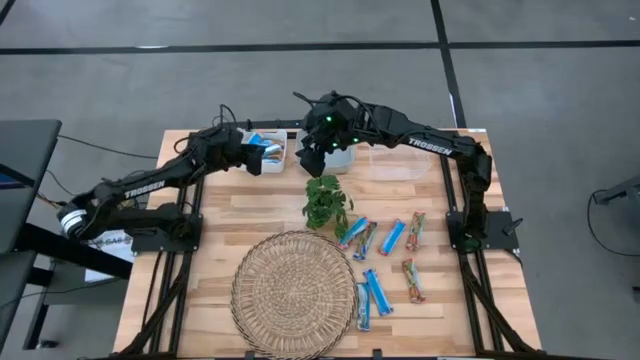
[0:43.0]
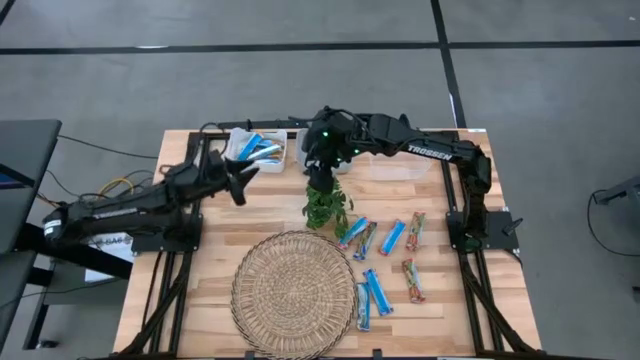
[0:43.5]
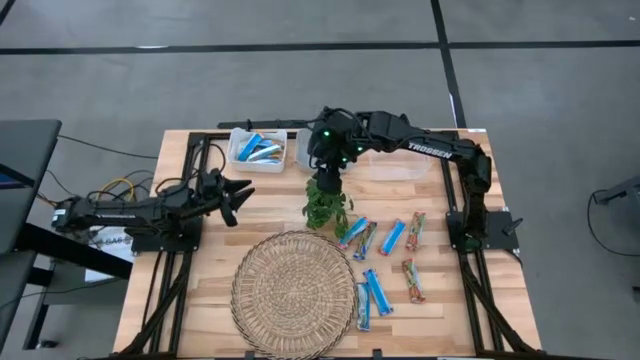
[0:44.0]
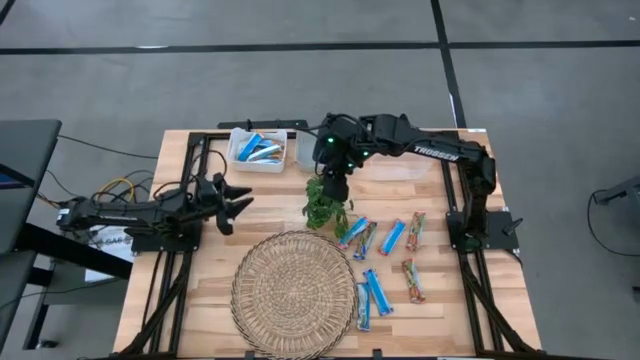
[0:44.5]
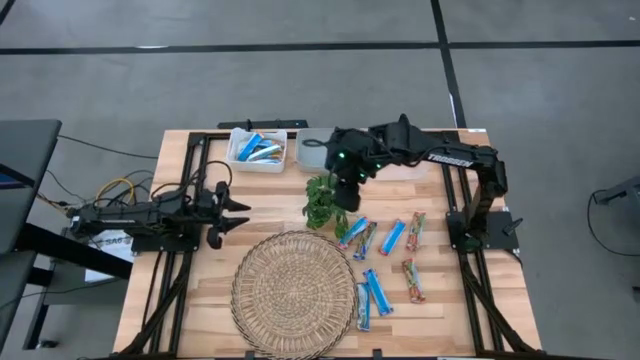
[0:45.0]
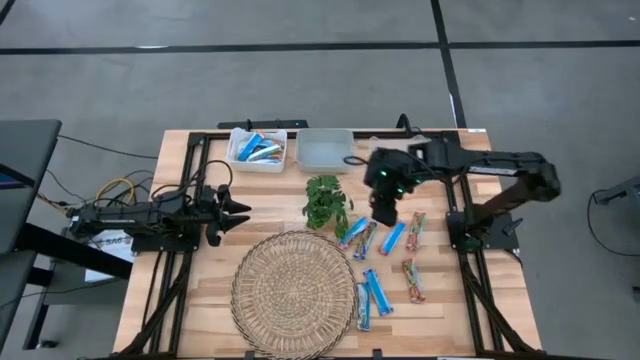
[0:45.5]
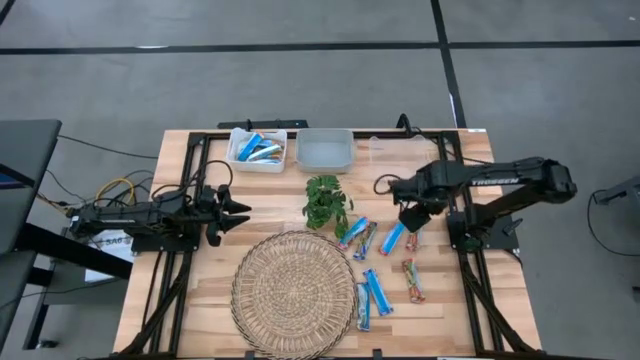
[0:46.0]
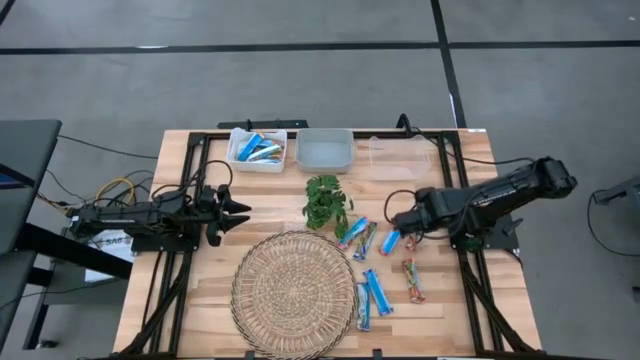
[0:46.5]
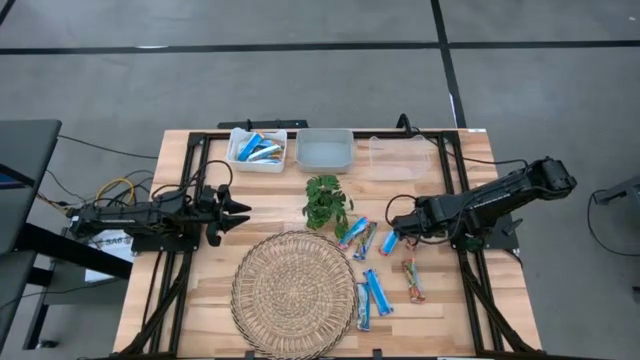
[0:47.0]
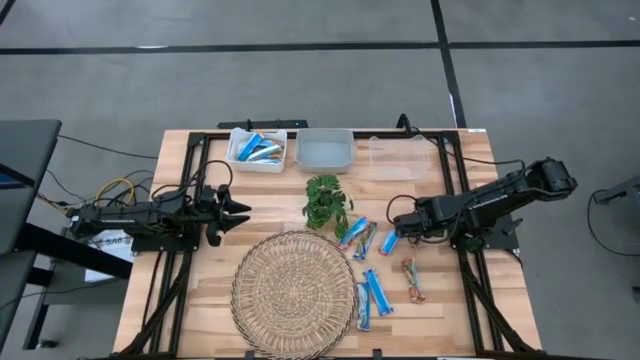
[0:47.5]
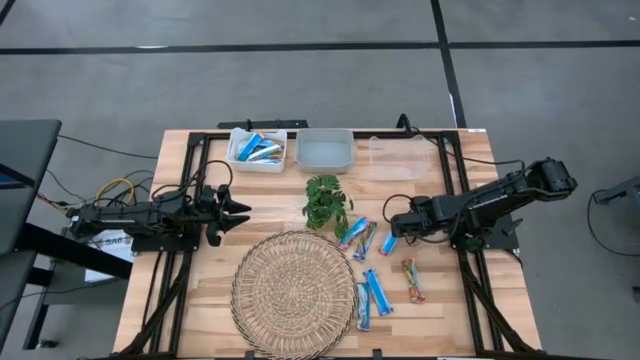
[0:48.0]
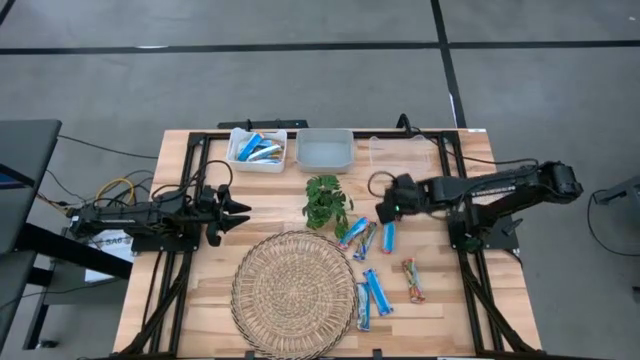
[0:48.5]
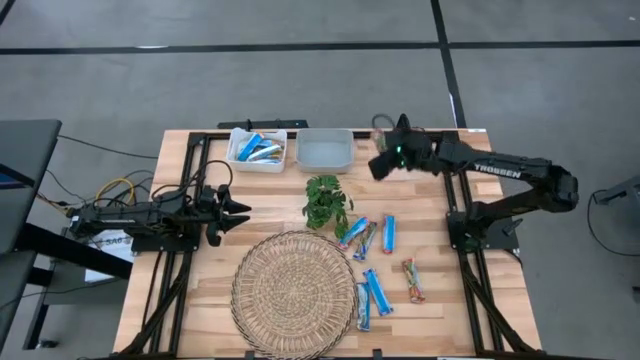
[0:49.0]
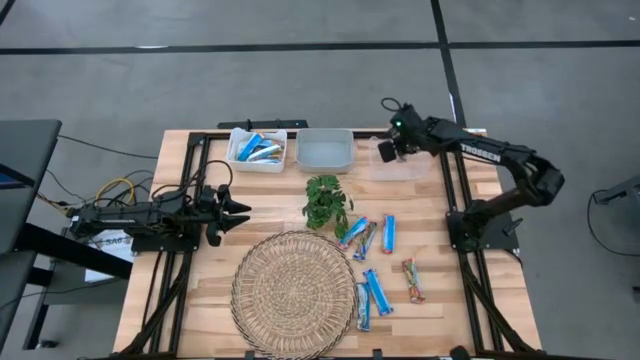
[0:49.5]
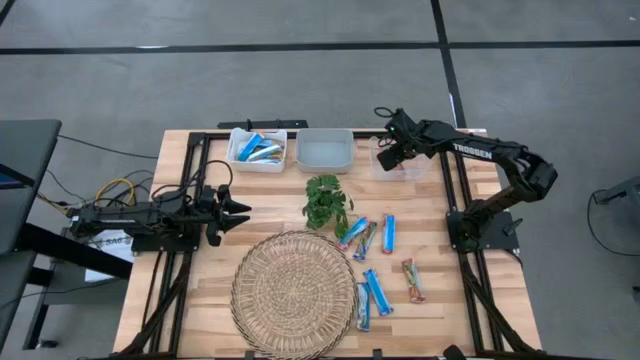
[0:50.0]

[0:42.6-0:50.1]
Task: Pick and place Granola Bars by type
Put the red granola bar into the transparent bin

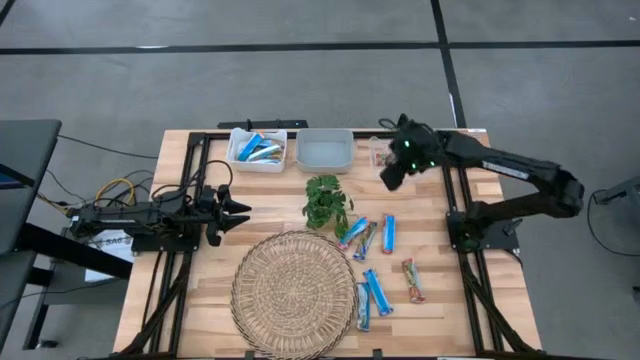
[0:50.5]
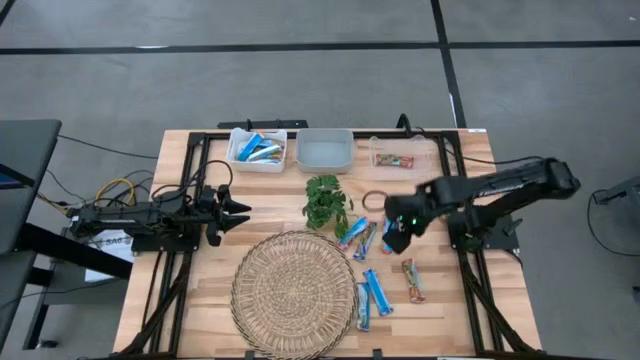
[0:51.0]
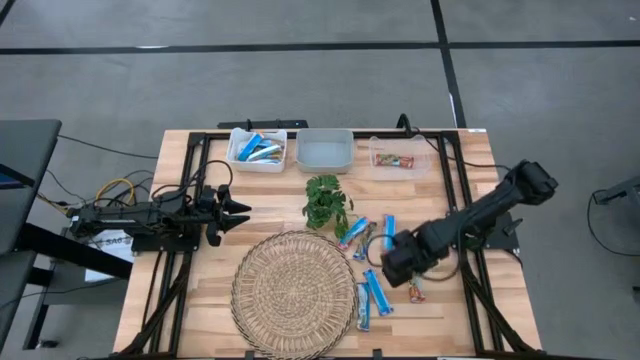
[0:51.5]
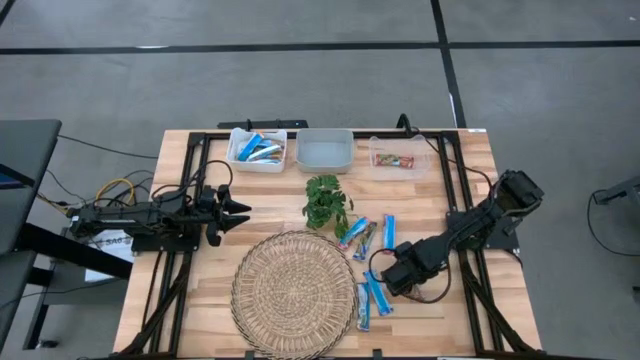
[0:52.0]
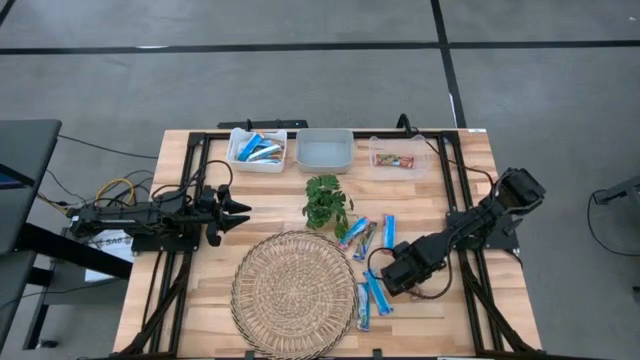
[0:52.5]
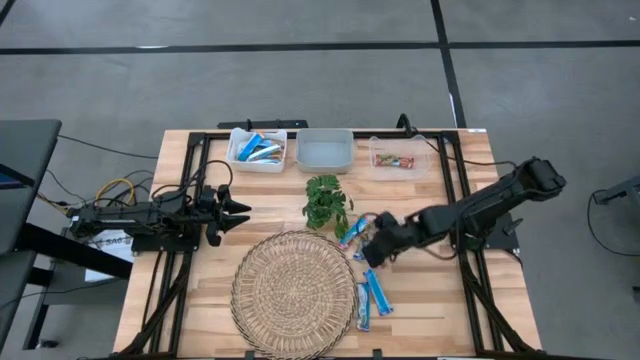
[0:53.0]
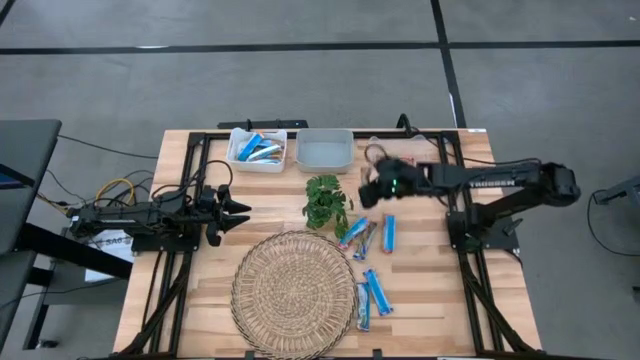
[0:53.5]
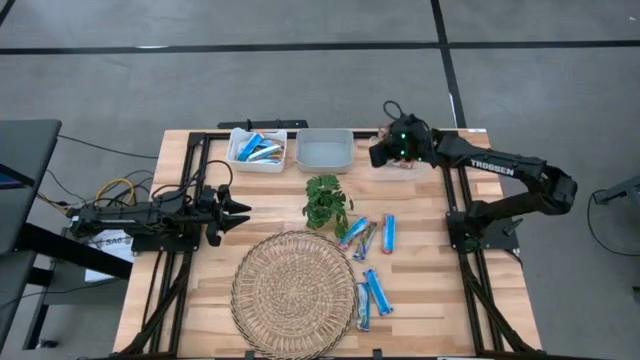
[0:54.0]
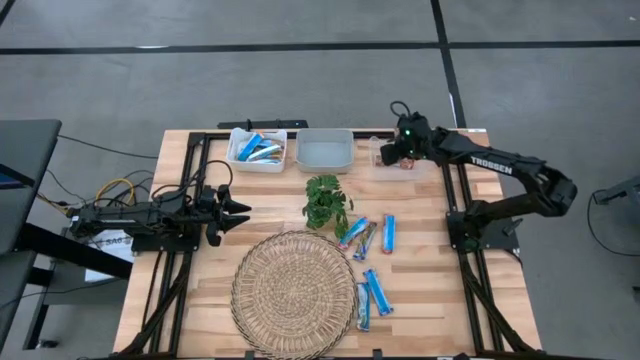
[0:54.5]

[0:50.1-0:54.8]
Put the red granola bar into the transparent bin

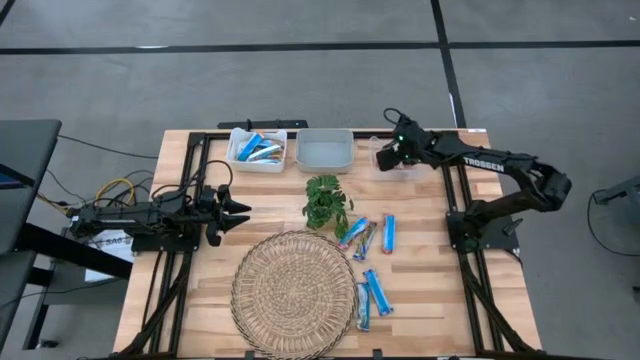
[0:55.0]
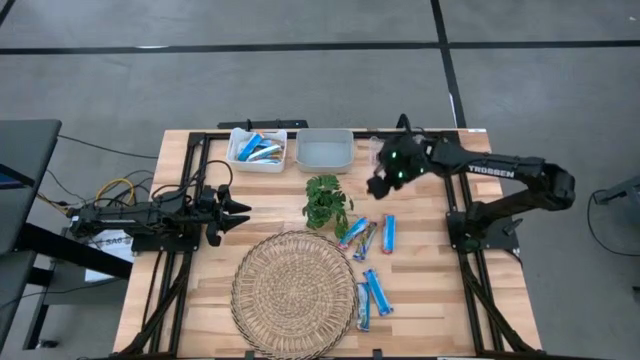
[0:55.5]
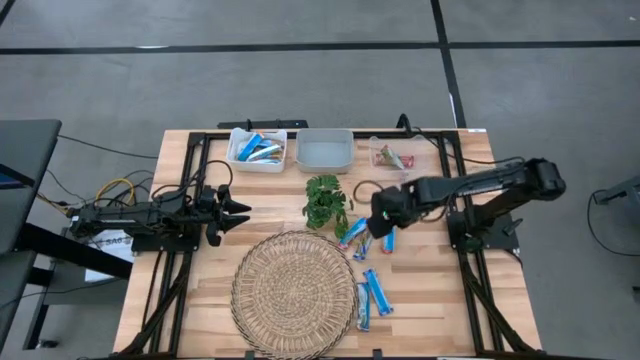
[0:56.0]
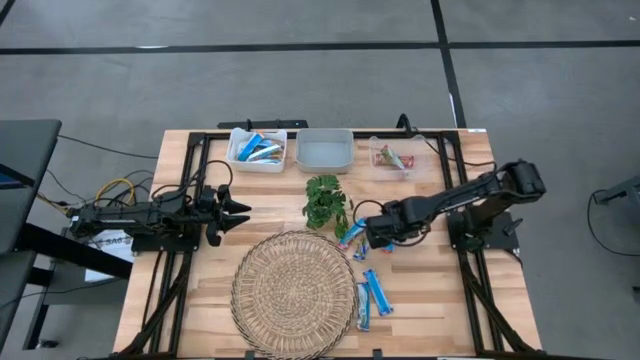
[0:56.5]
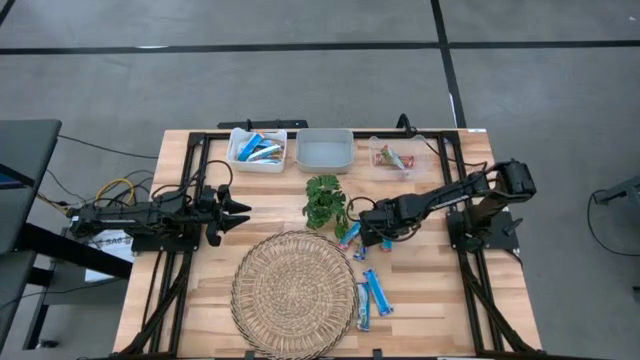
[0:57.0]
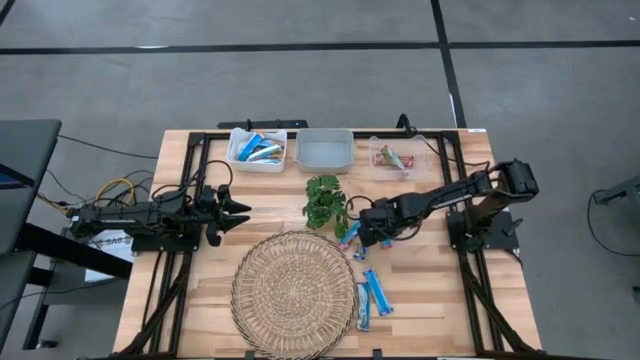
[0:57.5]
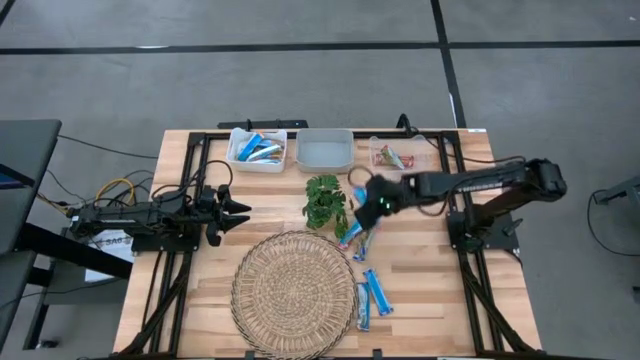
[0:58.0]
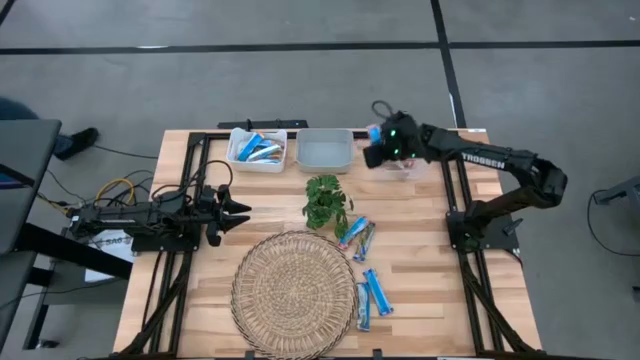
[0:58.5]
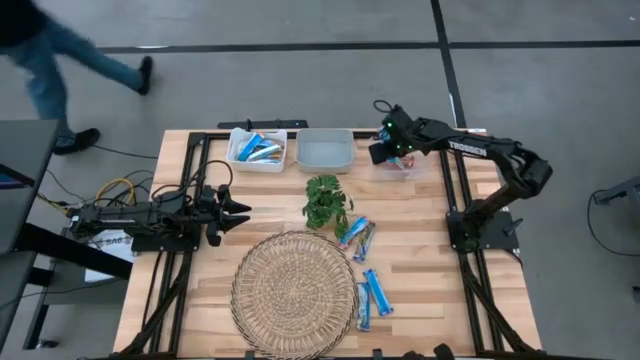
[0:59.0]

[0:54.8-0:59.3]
Put the red granola bar into the transparent bin

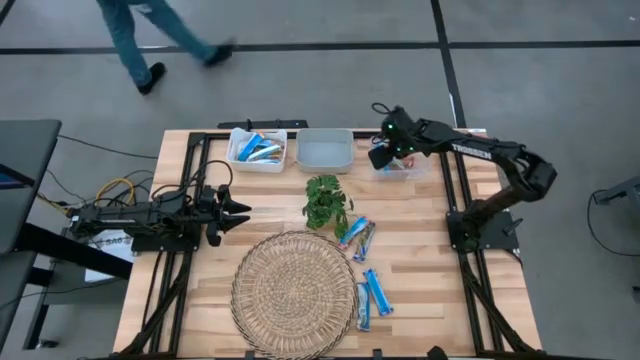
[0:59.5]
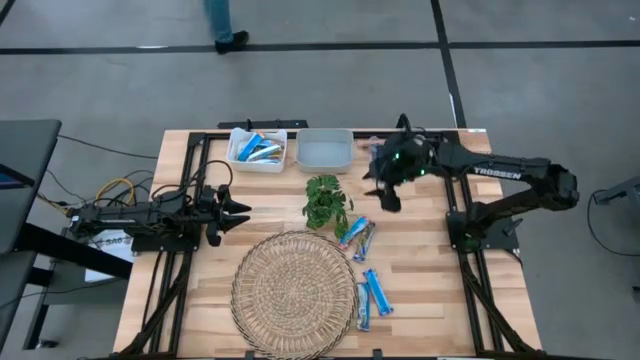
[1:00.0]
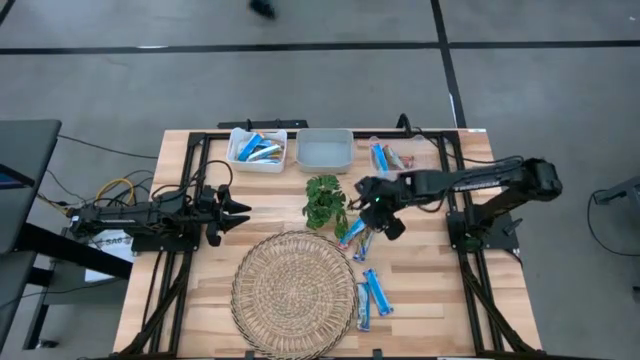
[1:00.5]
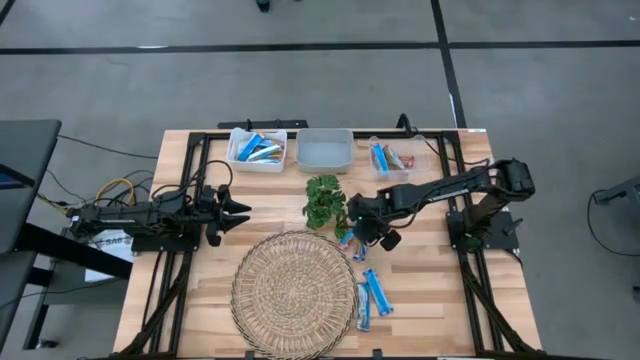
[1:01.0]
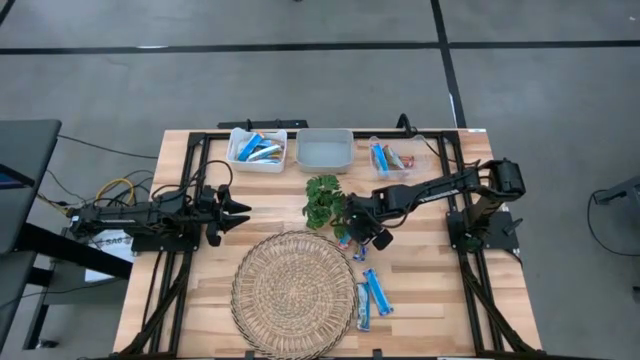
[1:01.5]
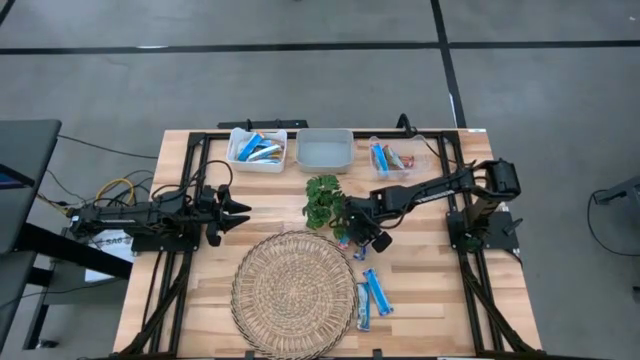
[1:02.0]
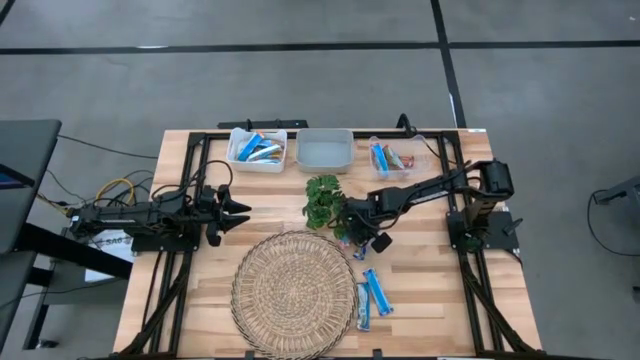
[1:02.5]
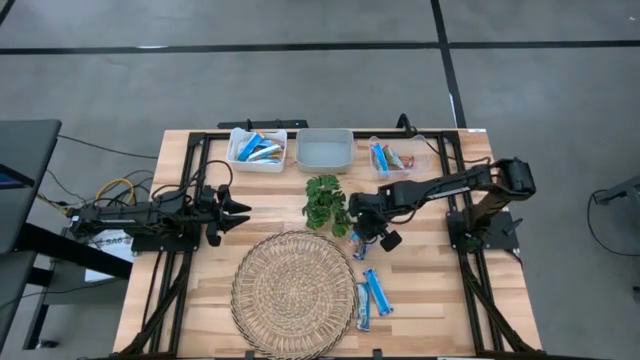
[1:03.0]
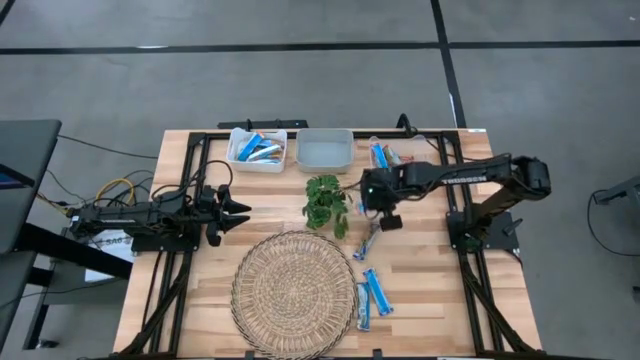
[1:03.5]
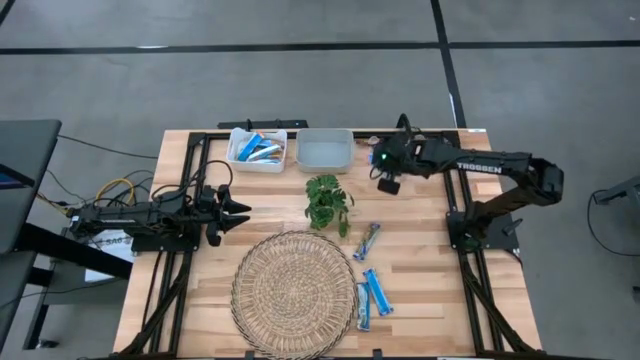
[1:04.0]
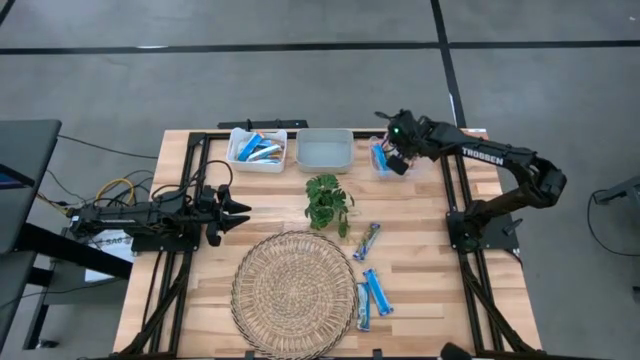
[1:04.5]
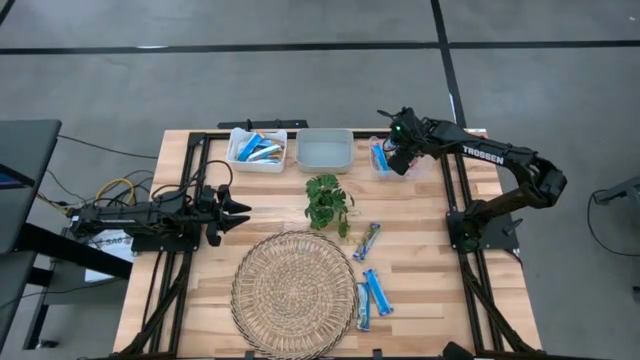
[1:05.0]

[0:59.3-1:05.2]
Put the red granola bar into the transparent bin
